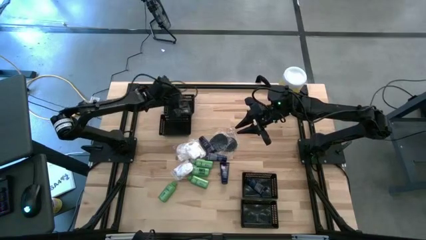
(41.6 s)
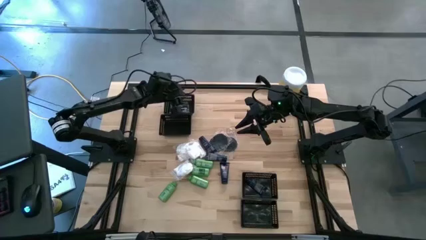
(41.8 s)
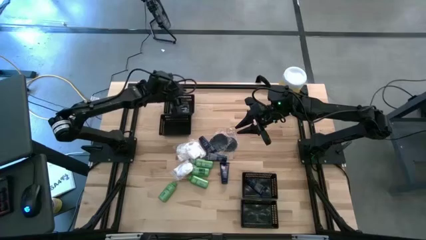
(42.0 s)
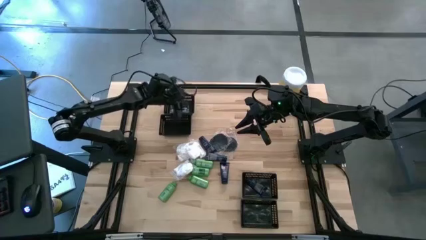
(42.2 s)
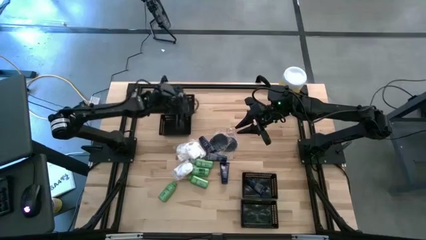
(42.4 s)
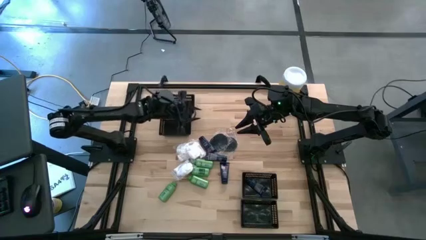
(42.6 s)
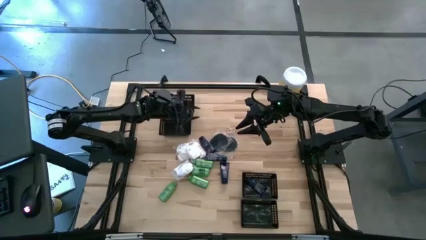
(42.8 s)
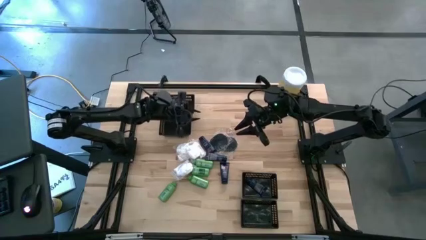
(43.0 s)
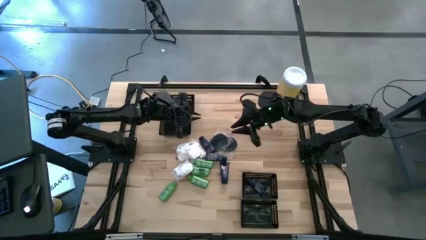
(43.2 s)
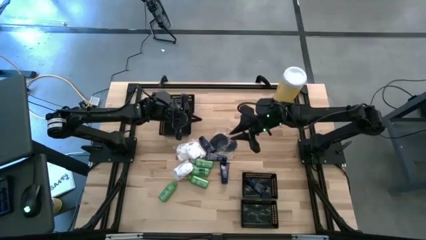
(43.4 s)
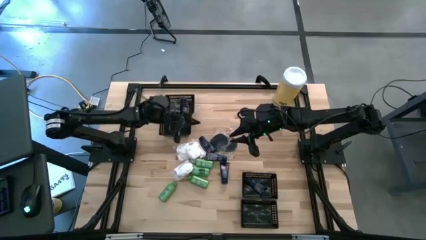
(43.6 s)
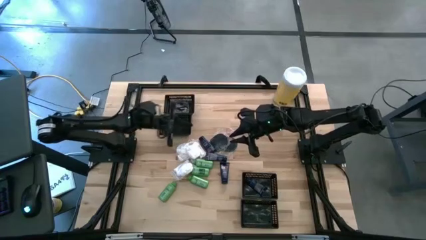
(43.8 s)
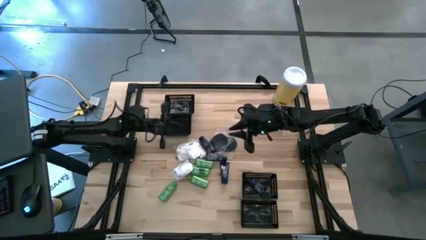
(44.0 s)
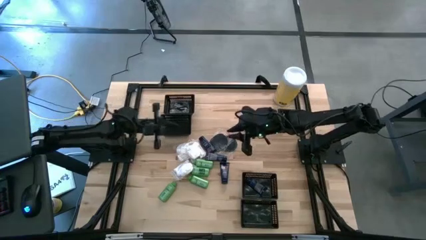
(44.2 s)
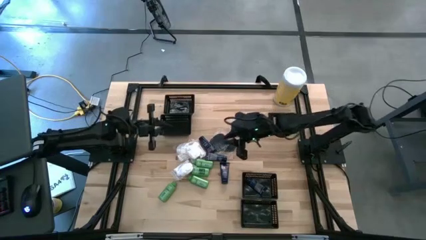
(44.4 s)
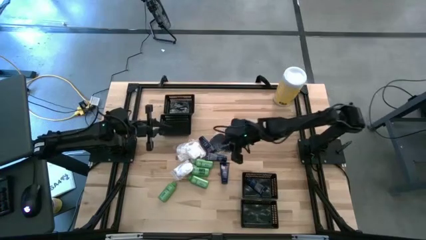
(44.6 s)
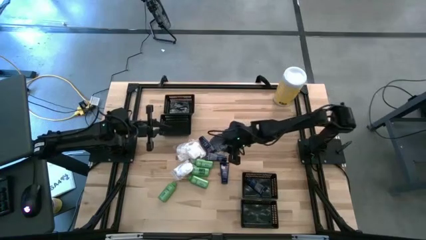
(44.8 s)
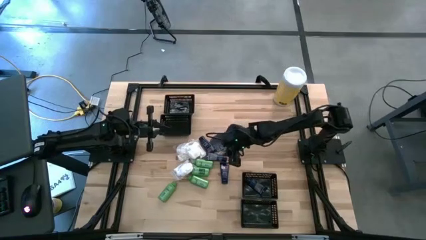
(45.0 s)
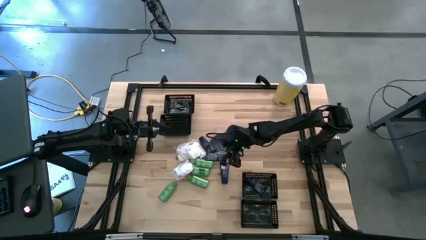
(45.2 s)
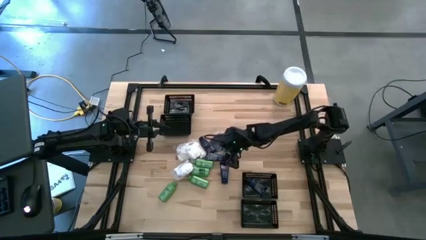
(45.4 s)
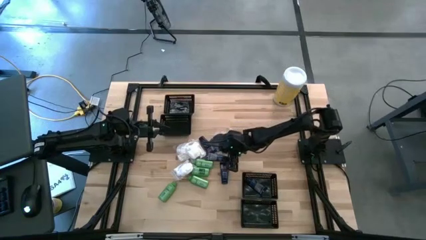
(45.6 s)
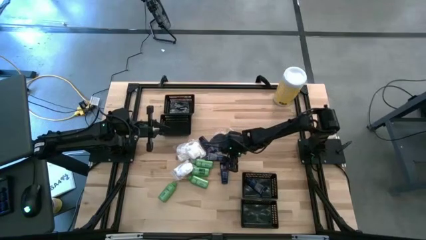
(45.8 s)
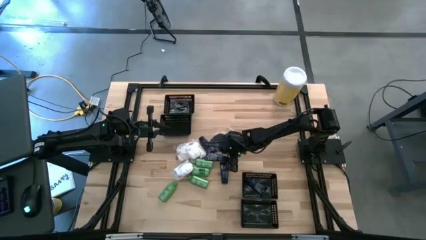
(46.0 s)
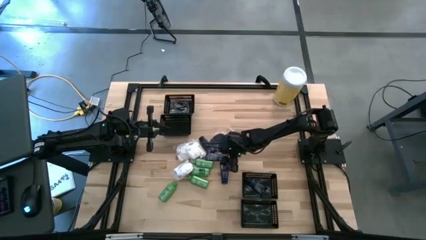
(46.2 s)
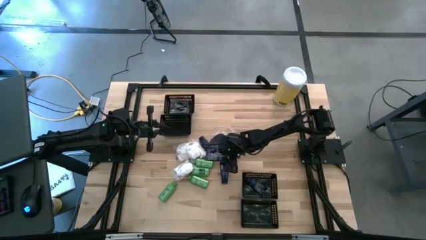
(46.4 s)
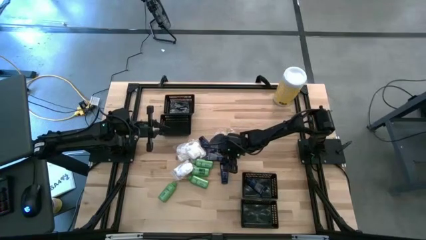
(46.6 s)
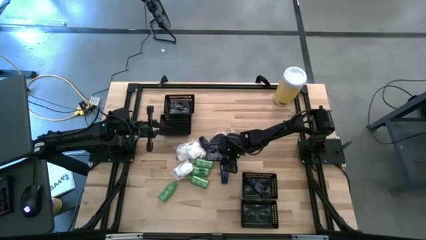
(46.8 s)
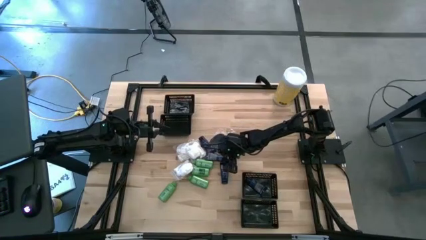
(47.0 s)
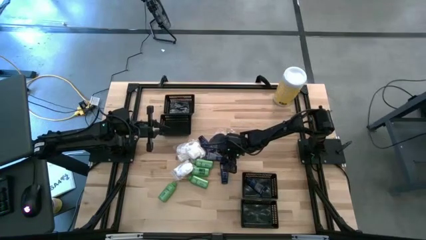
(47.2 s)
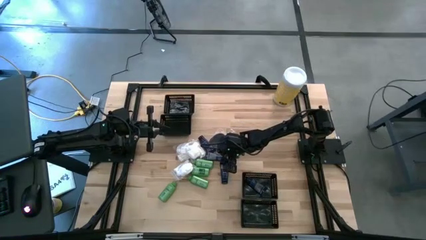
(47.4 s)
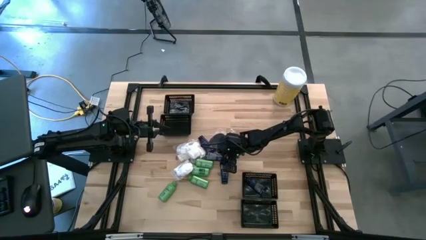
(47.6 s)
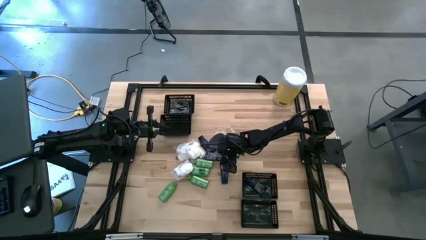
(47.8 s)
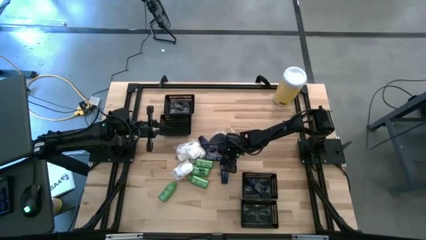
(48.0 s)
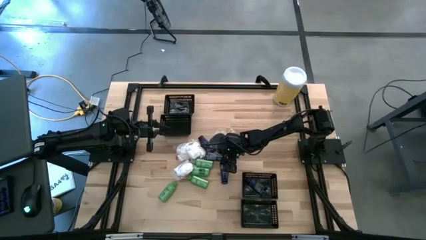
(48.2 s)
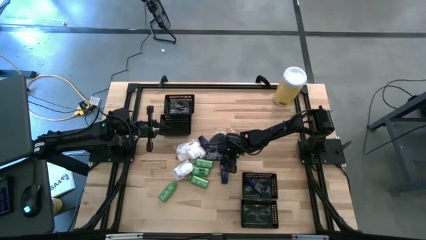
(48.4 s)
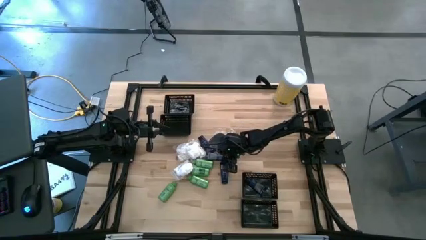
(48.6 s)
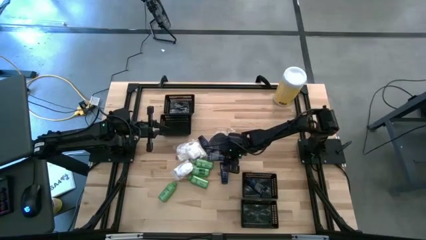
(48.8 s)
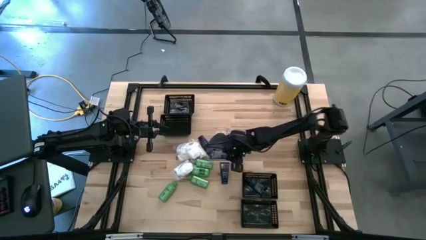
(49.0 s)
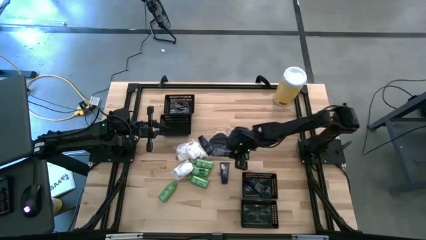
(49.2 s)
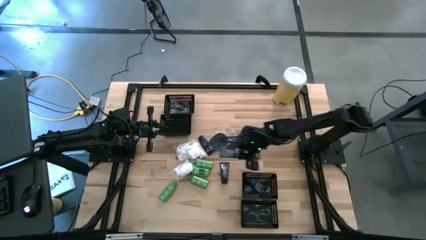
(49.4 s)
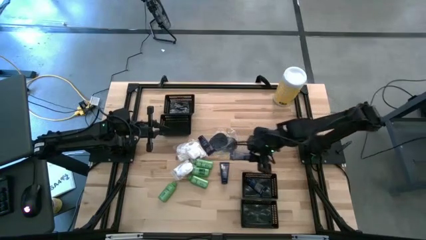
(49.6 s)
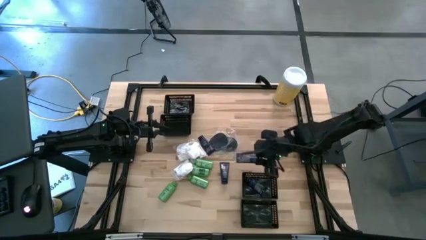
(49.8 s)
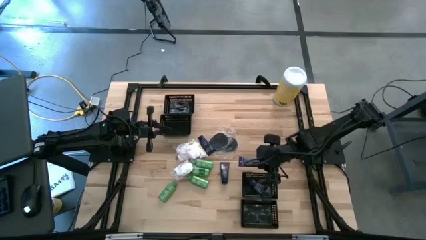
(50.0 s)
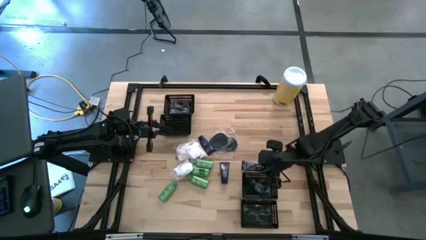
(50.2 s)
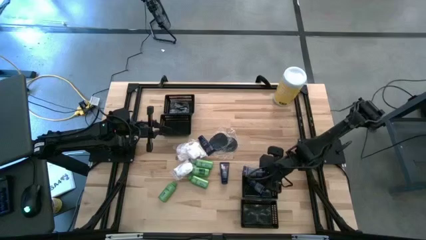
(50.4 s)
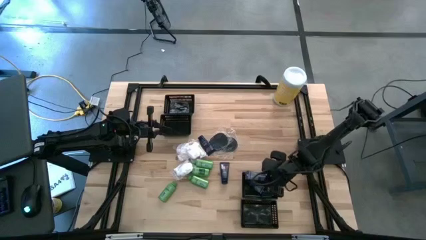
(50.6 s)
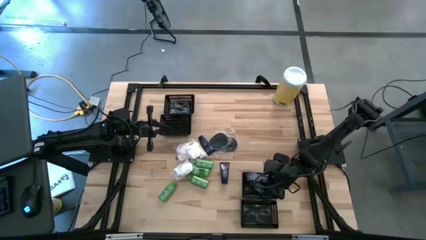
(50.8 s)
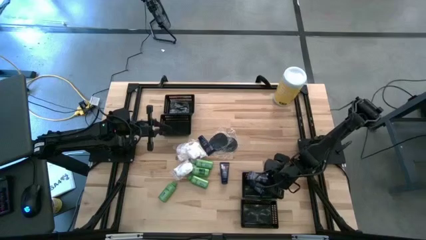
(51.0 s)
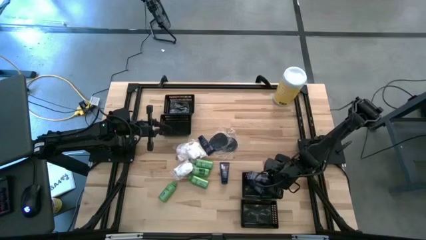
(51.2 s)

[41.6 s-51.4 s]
Task: Pick & Place Travel size toiletries
Put the blue shave cream into the middle bottom black basket
